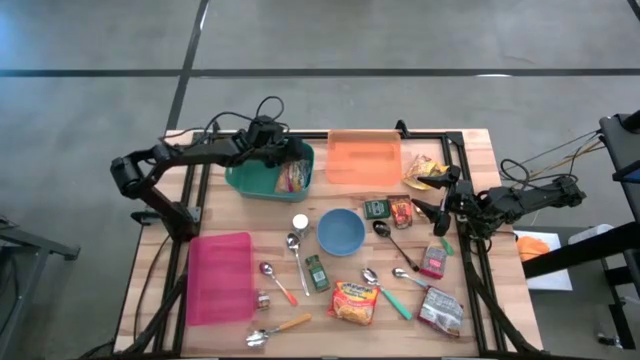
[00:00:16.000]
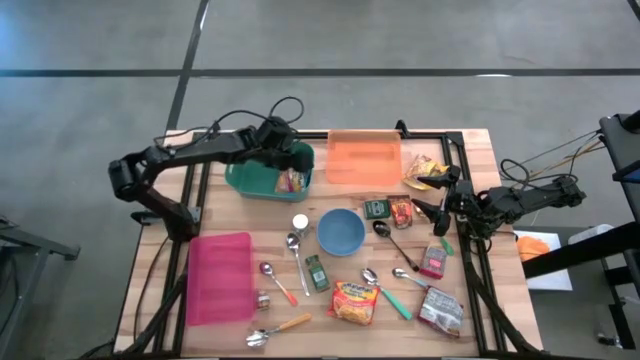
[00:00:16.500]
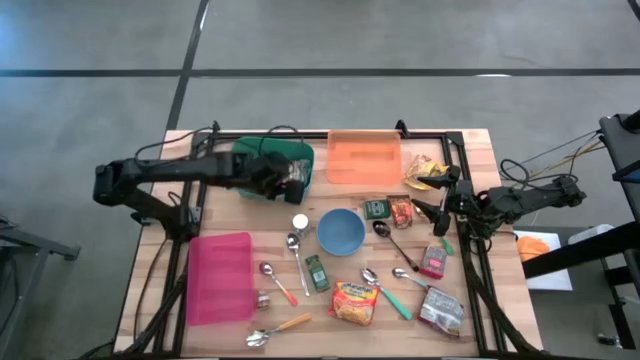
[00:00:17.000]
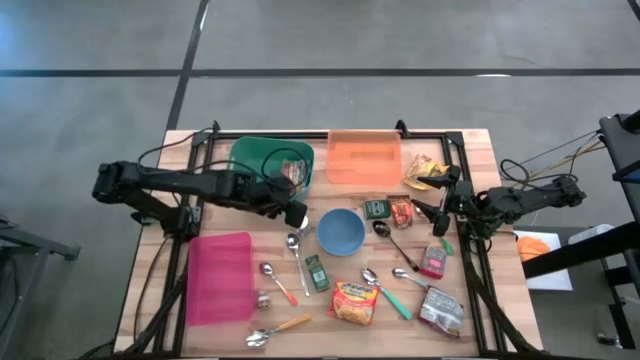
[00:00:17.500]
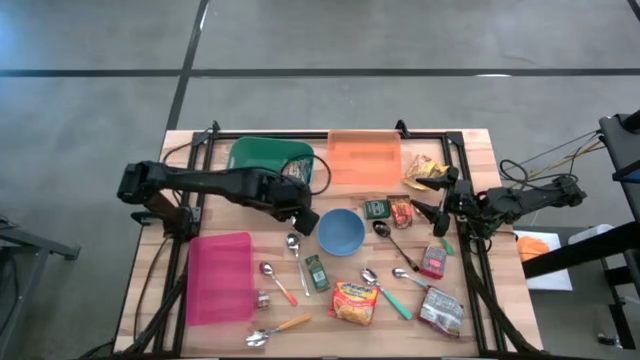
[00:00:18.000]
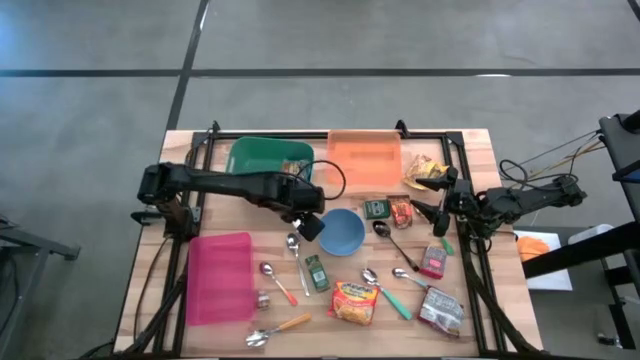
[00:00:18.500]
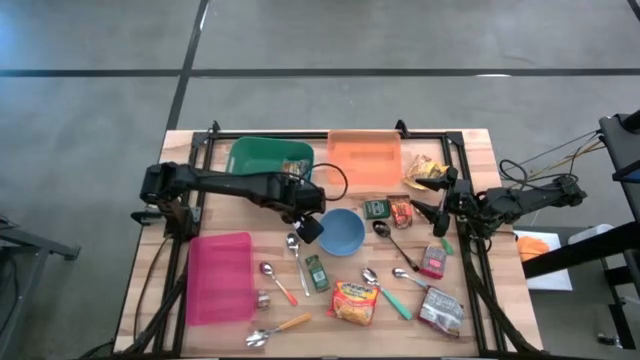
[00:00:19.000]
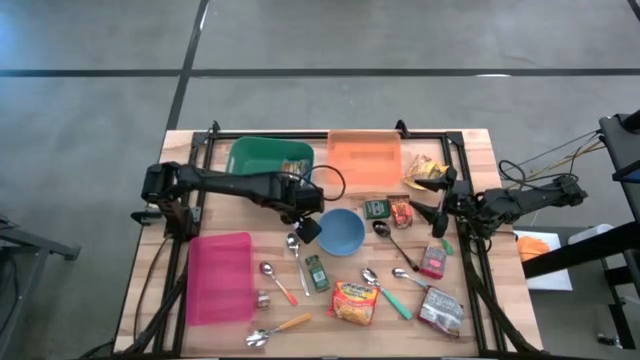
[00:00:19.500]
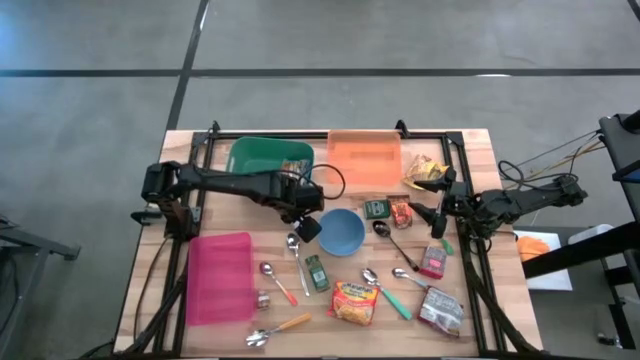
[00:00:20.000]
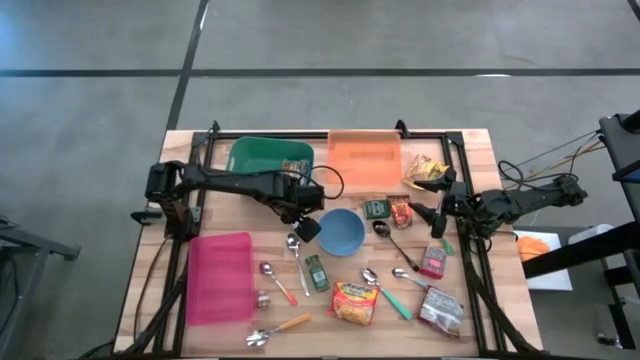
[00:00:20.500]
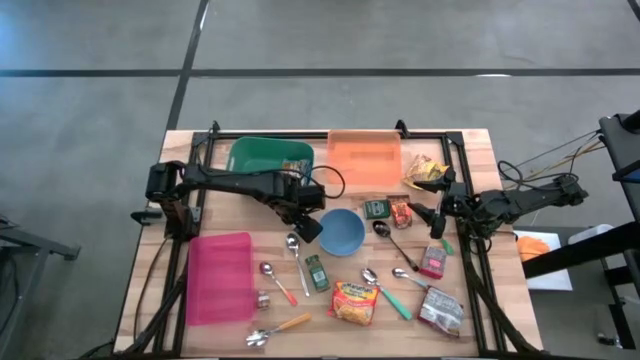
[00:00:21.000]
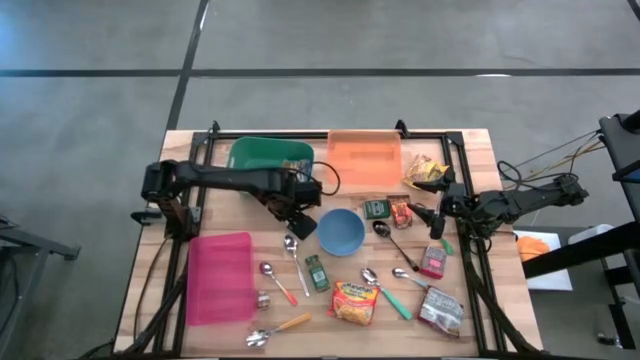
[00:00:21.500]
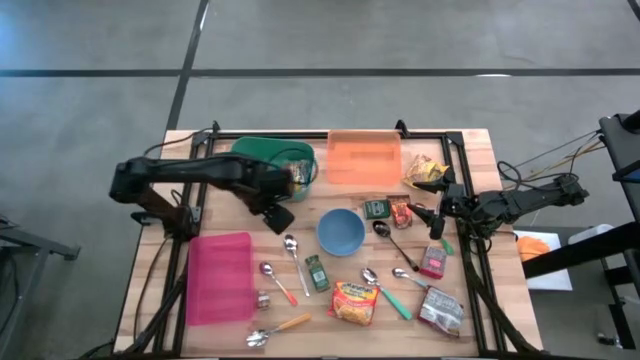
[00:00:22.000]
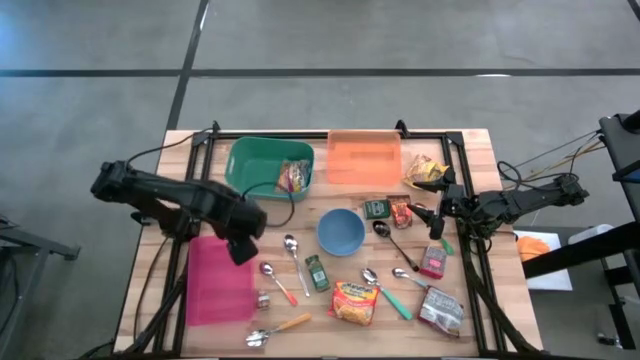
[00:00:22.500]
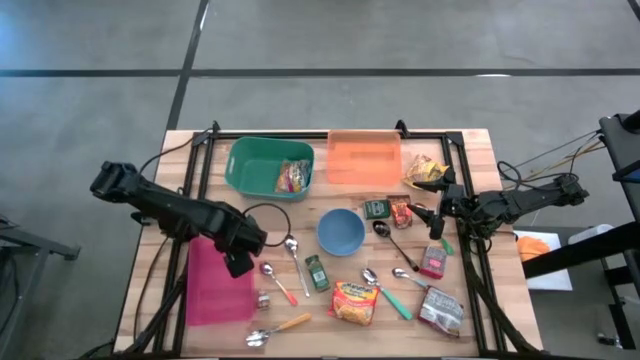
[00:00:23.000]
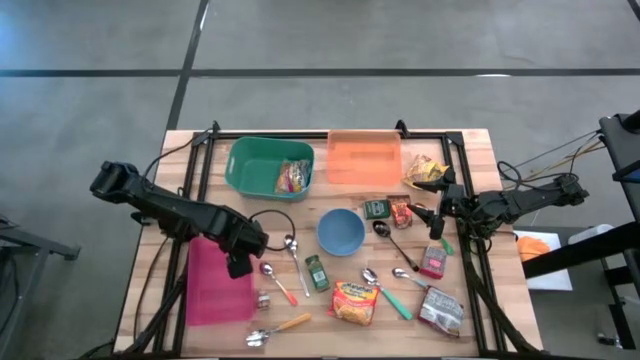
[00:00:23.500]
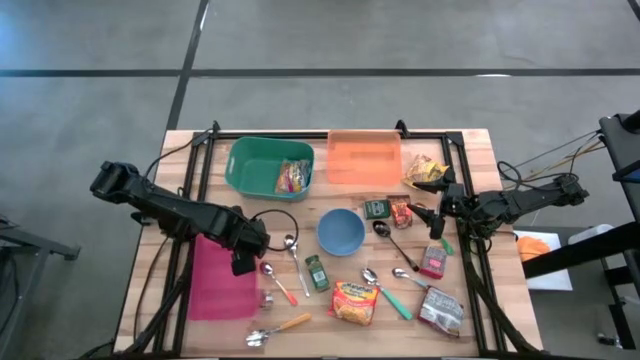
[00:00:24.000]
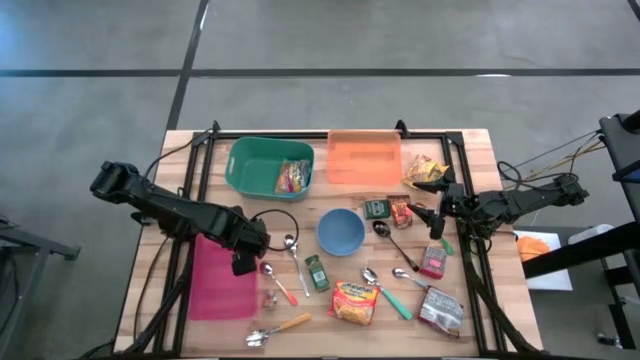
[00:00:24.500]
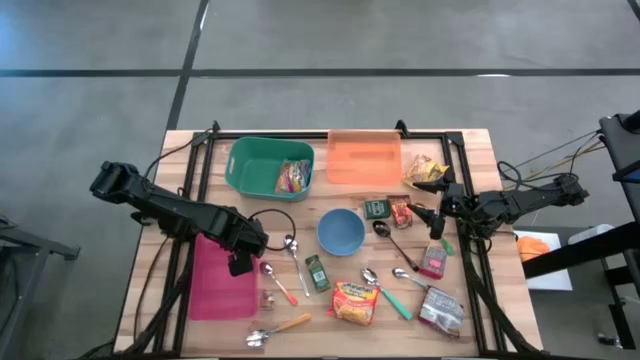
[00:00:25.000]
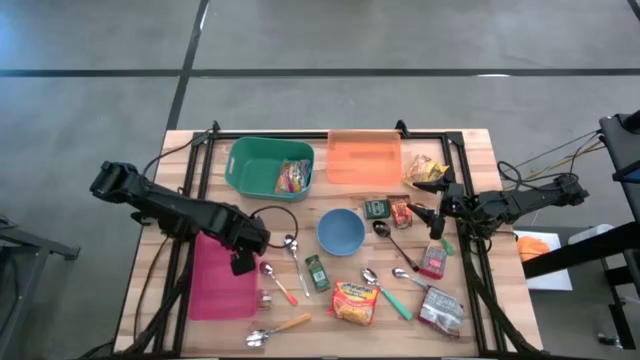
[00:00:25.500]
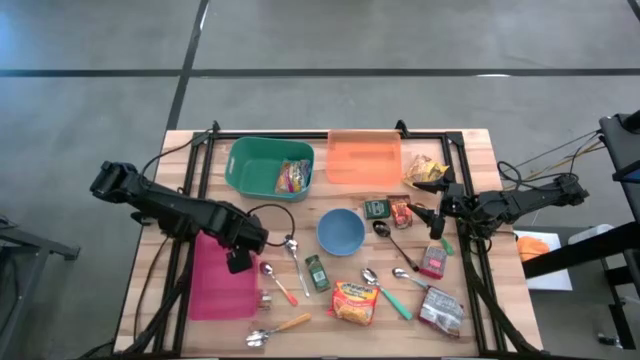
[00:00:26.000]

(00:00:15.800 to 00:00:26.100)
Put the white seasoning bottle into the pink bin

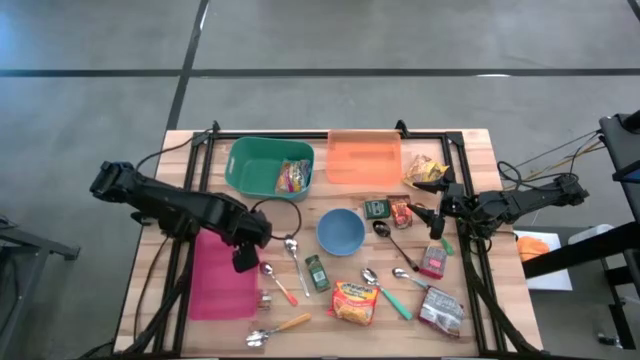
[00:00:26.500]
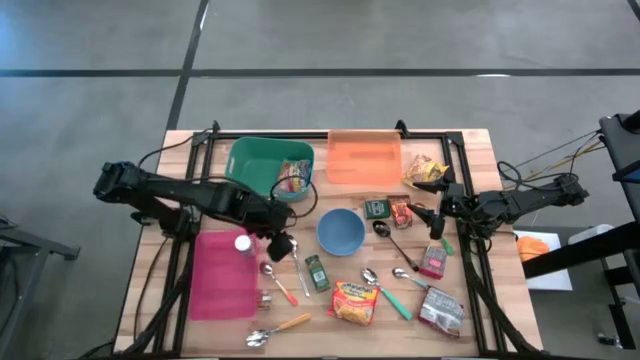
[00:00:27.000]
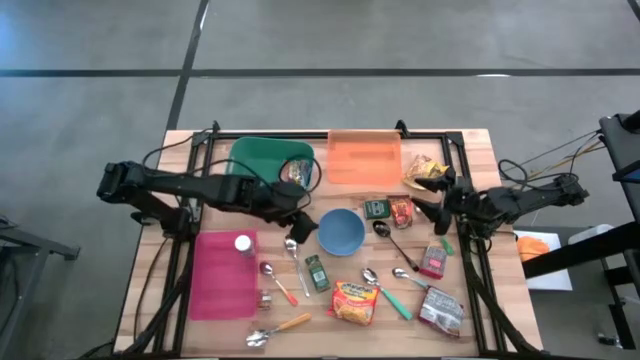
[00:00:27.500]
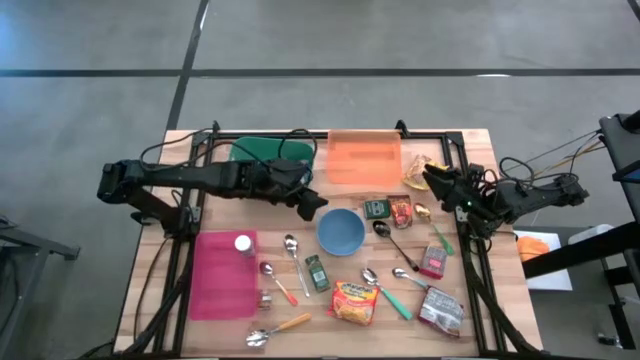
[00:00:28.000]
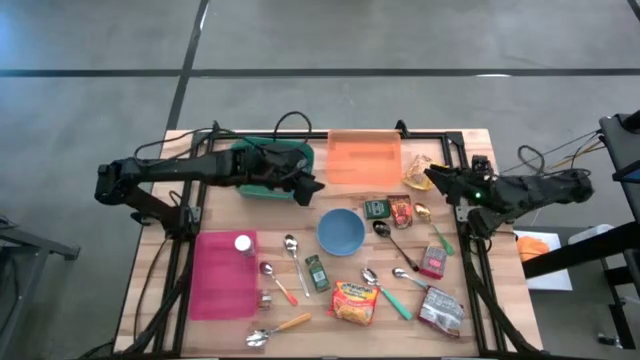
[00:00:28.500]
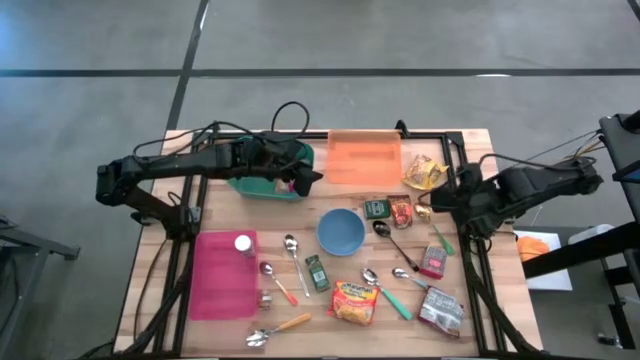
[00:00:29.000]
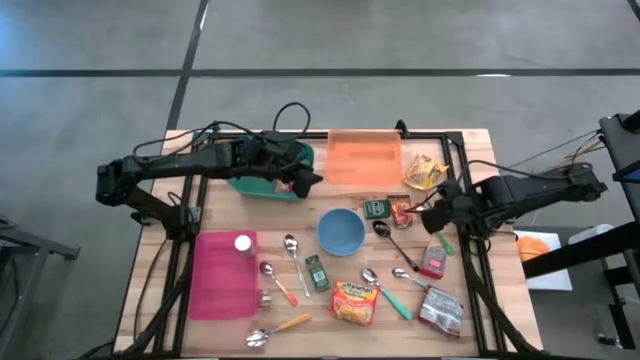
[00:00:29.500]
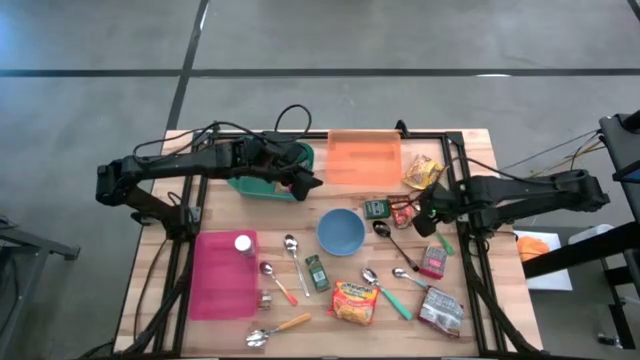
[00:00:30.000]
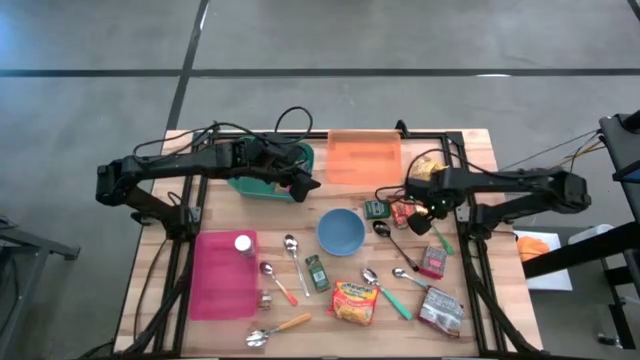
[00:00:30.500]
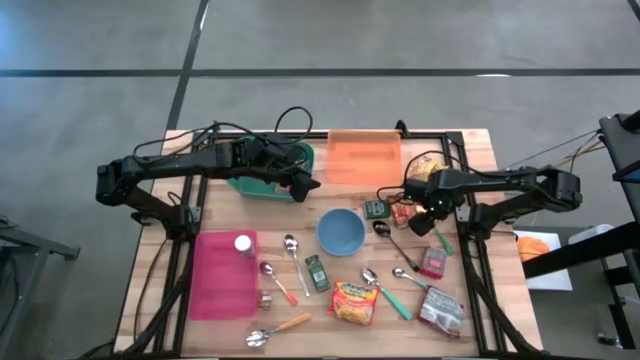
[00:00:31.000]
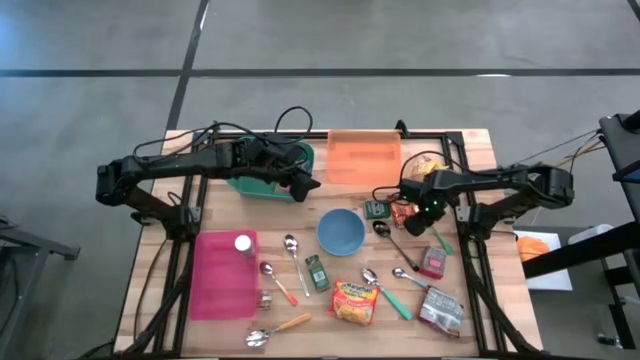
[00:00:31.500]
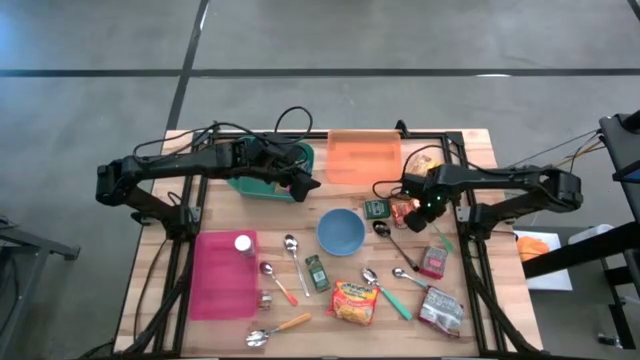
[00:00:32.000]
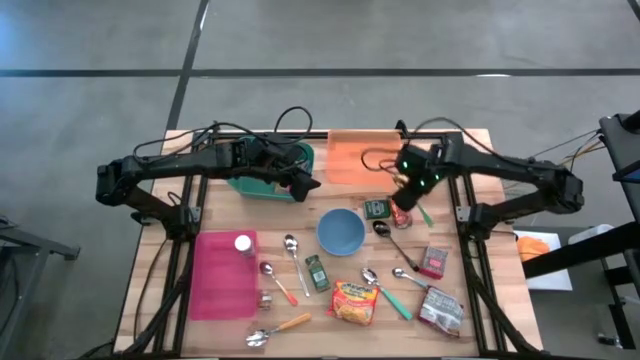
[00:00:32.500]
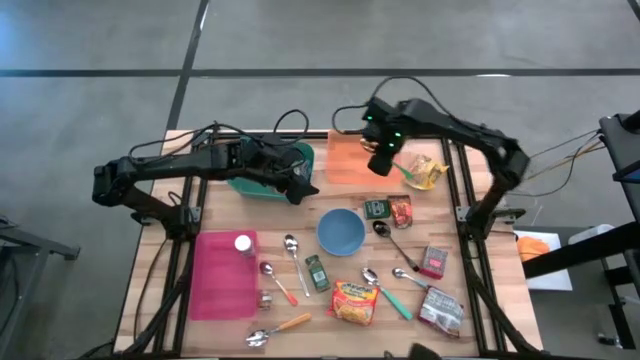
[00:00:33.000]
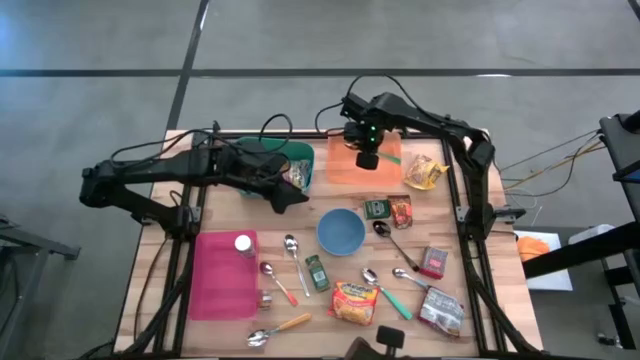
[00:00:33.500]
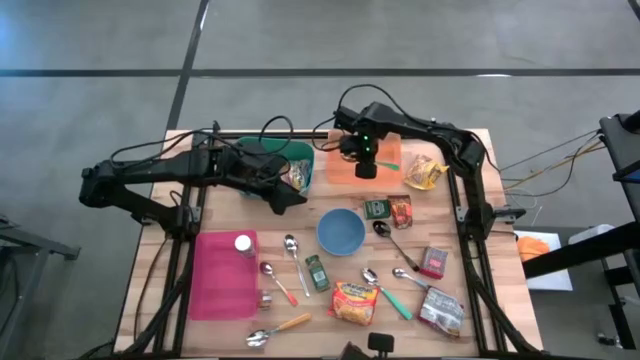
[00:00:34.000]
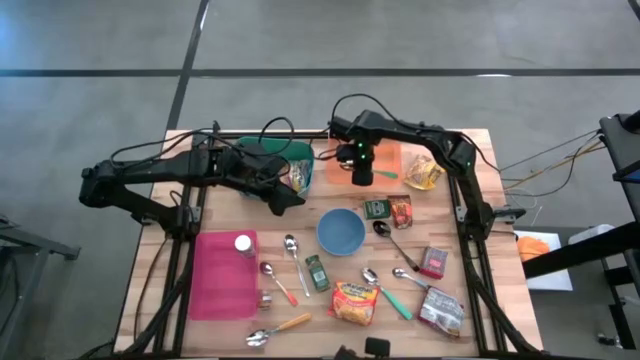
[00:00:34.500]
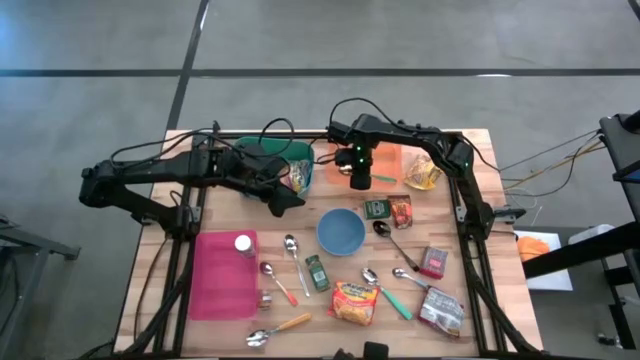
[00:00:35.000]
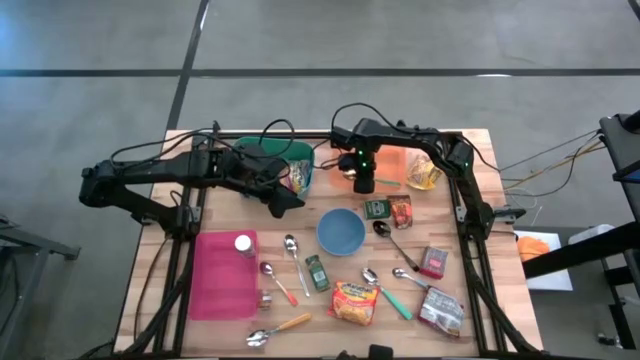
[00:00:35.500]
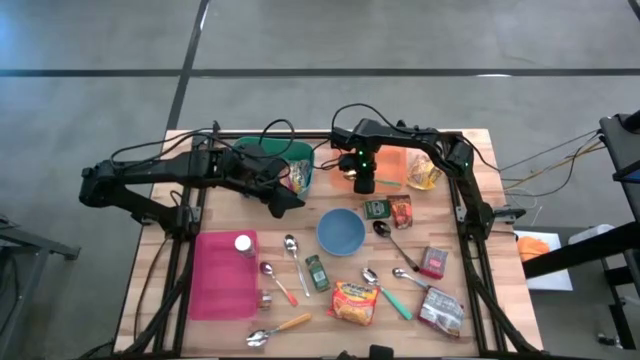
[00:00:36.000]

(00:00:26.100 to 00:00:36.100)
Put the green spoon into the orange bin
